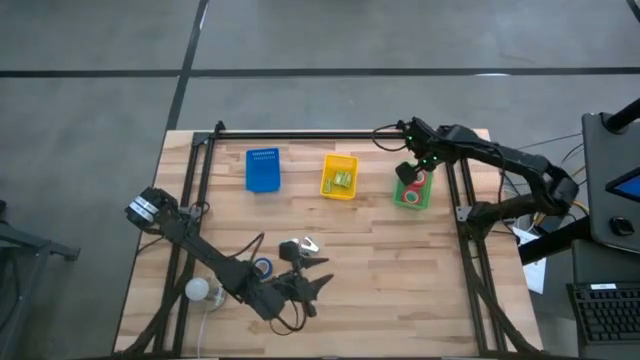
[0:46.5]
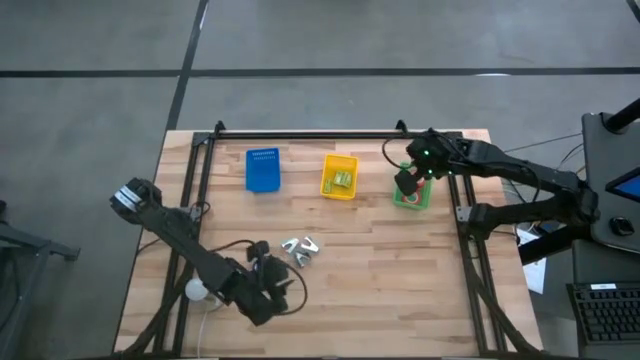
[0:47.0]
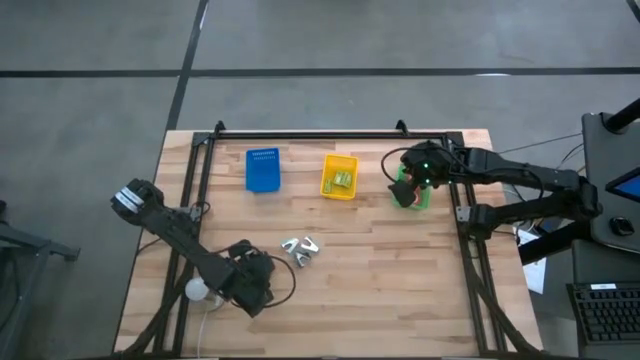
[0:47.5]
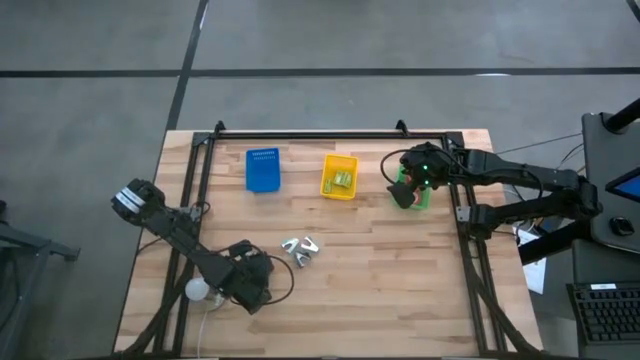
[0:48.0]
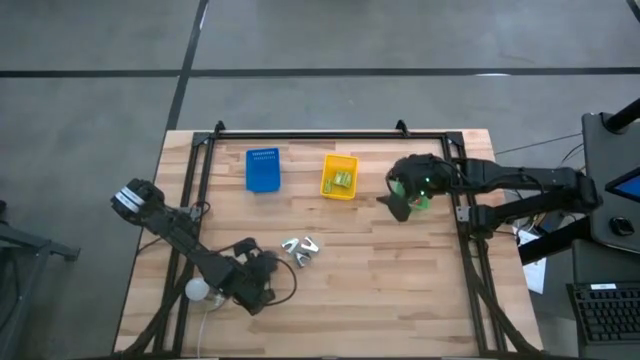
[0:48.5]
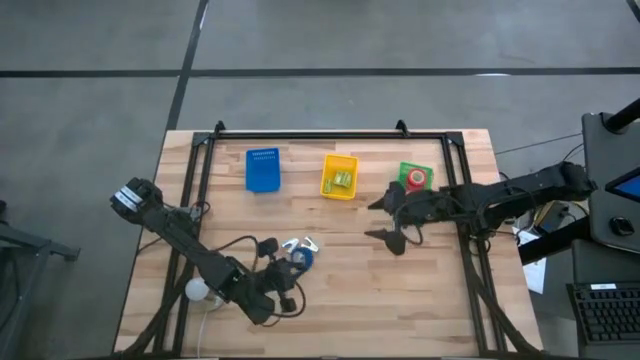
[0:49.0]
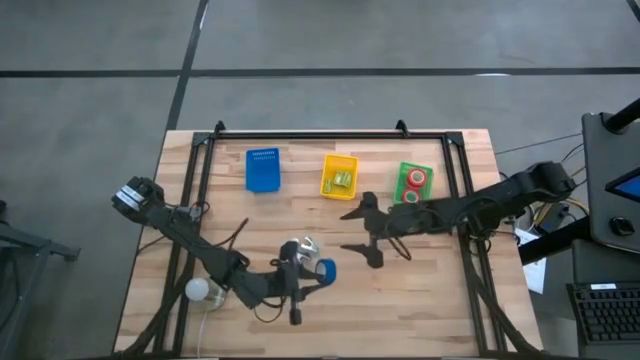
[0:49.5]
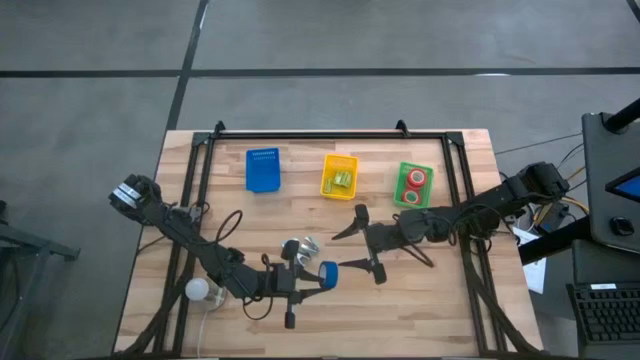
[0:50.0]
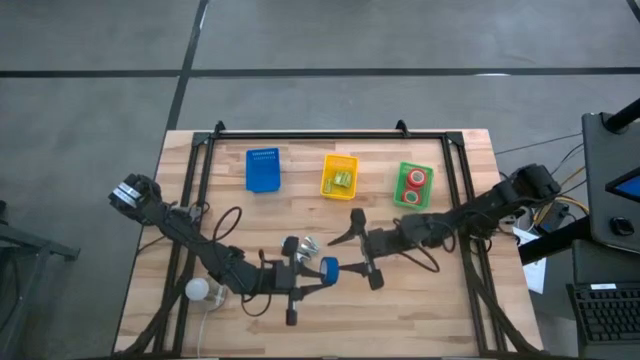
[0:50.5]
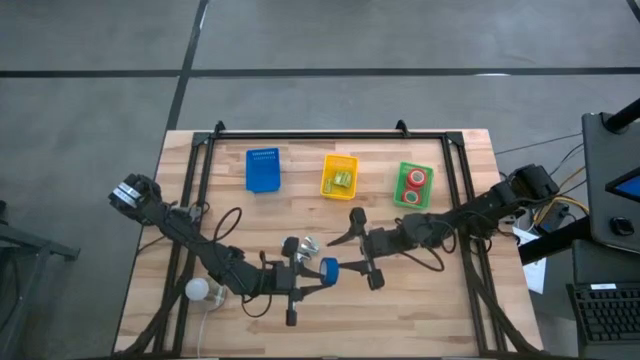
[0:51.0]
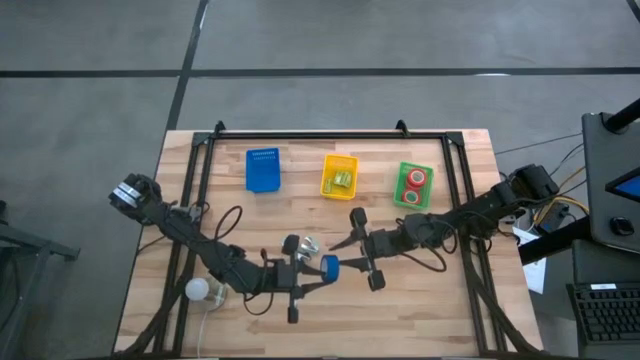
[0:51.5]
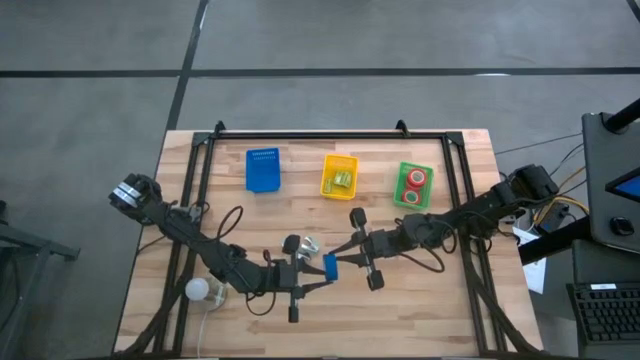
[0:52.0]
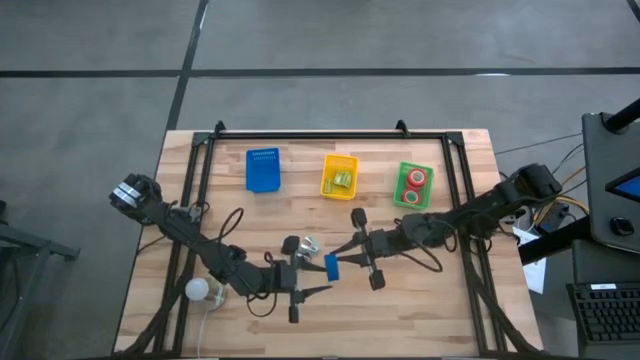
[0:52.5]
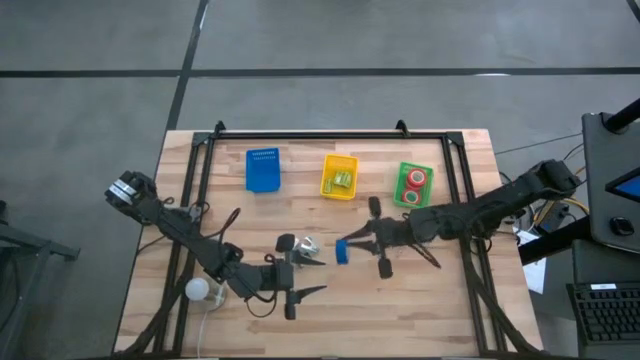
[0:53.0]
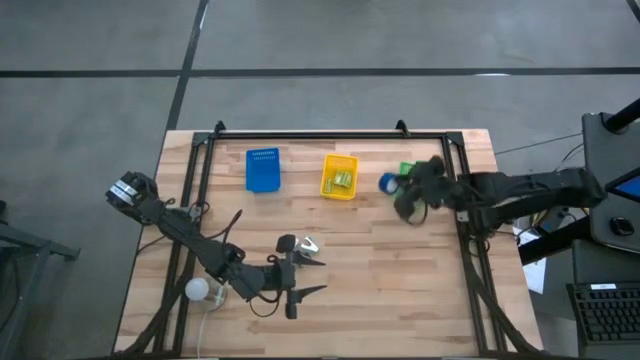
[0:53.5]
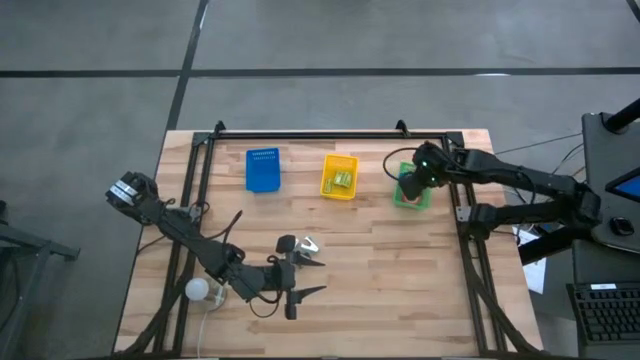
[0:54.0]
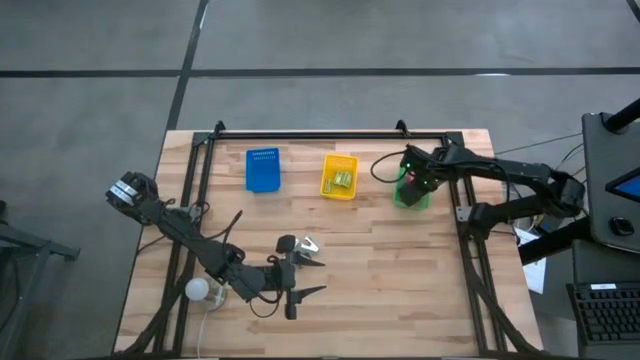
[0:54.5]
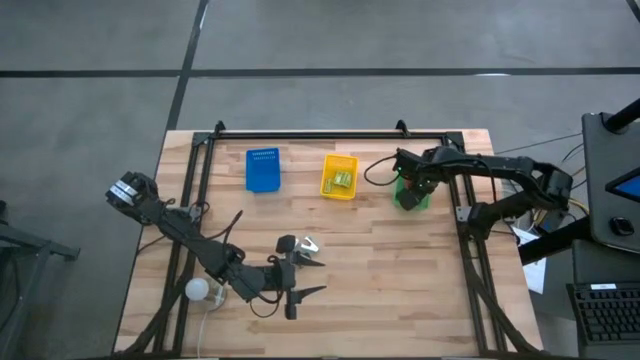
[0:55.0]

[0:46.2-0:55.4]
Task: Pick and place Stapler, Stapler remover, tape
Put the blue tape into the green bin

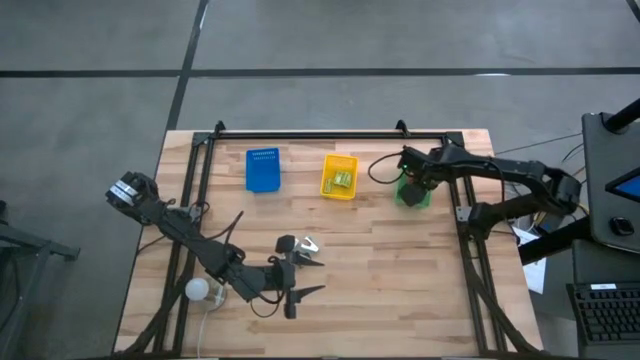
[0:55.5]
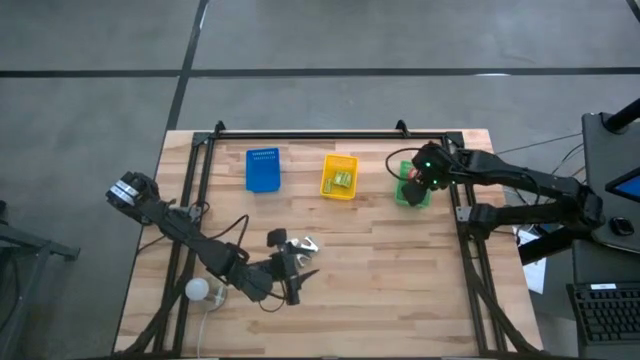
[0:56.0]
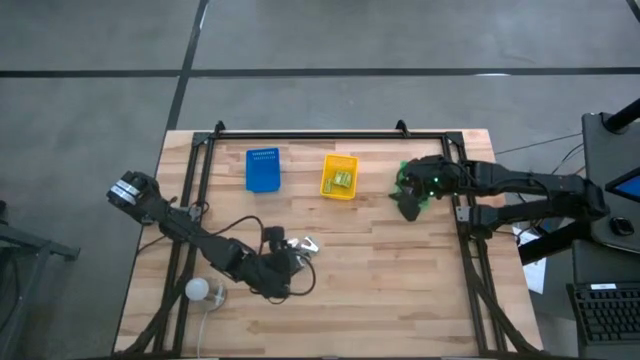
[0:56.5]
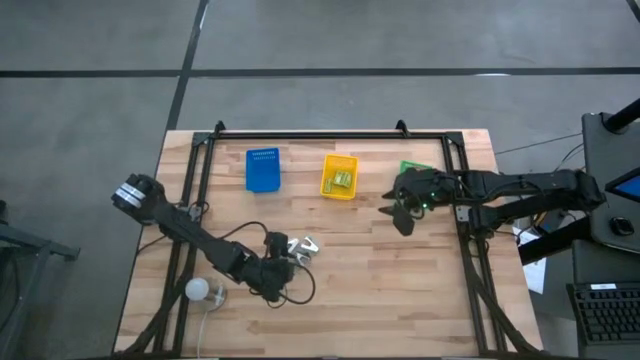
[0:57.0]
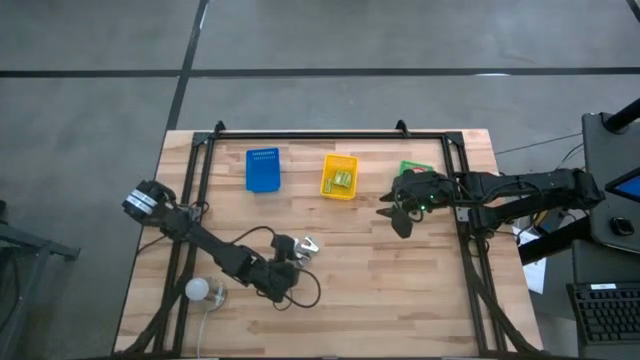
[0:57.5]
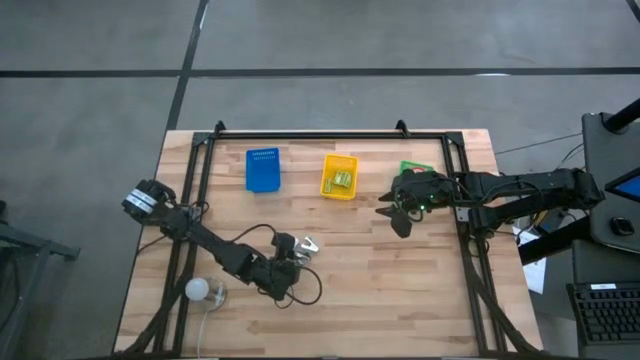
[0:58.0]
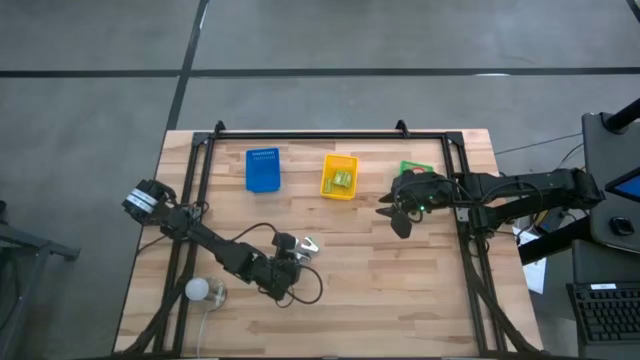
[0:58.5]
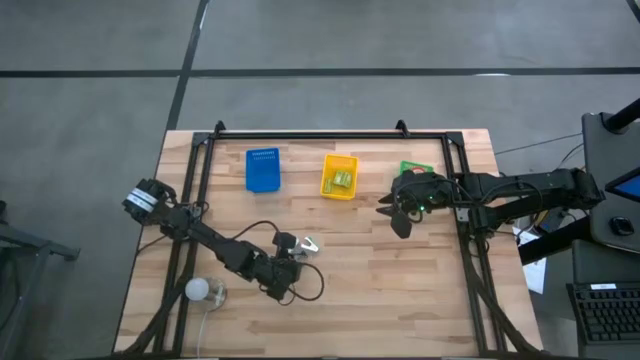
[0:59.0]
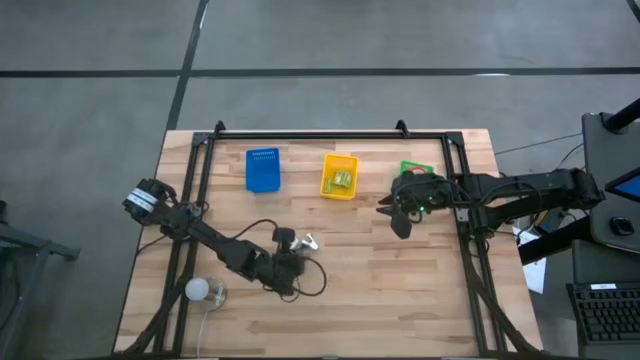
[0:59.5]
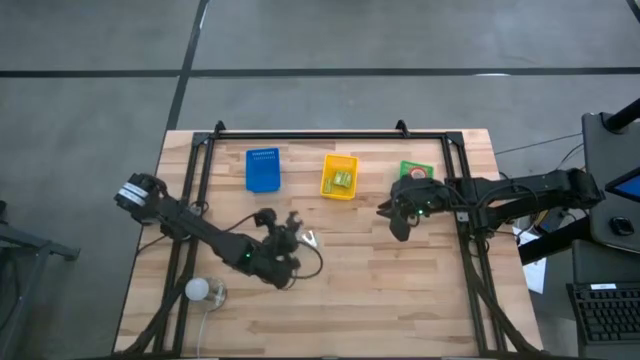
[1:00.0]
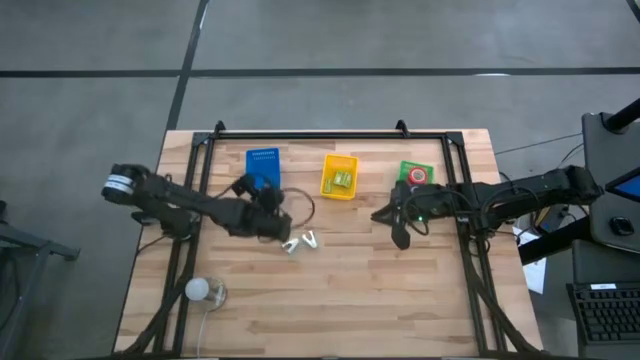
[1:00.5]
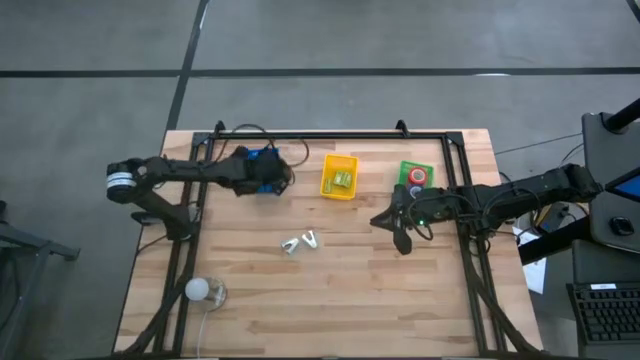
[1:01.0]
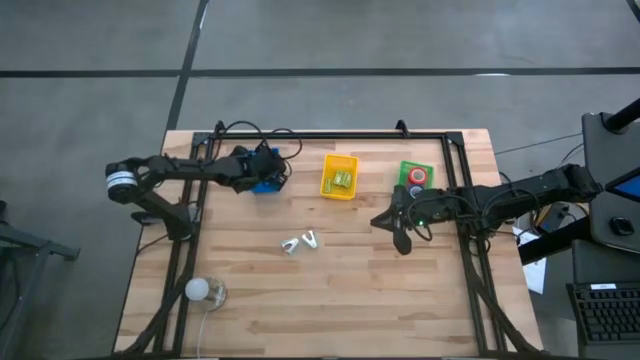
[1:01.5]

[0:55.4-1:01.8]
Put the black staple remover into the blue bin

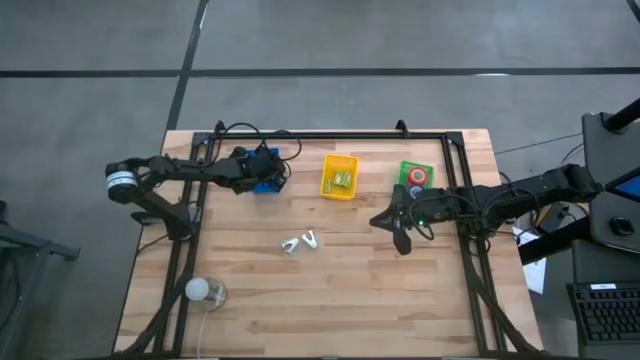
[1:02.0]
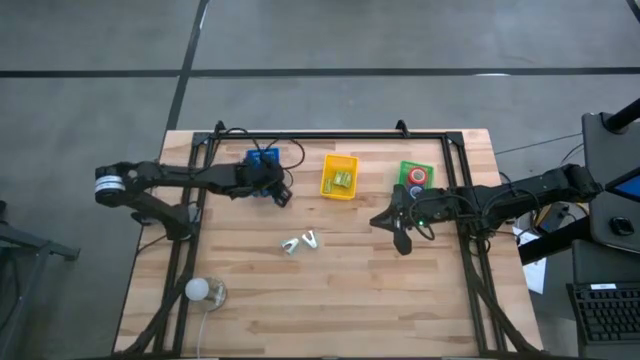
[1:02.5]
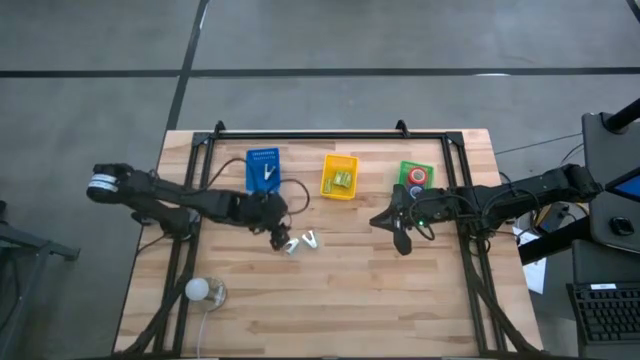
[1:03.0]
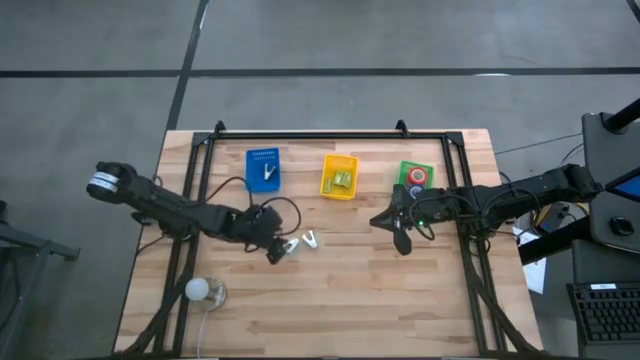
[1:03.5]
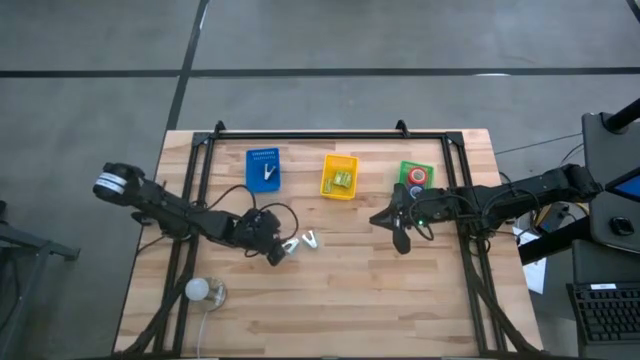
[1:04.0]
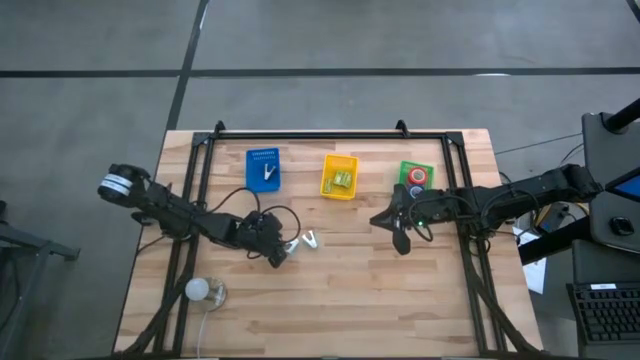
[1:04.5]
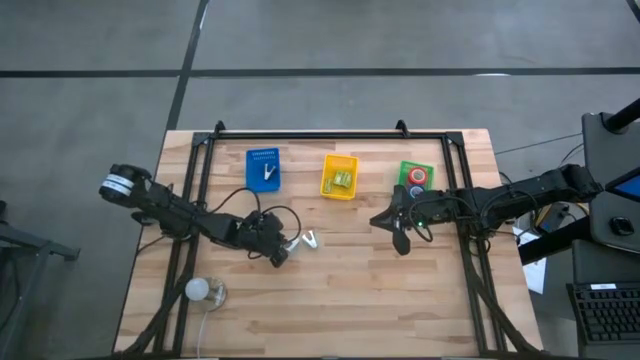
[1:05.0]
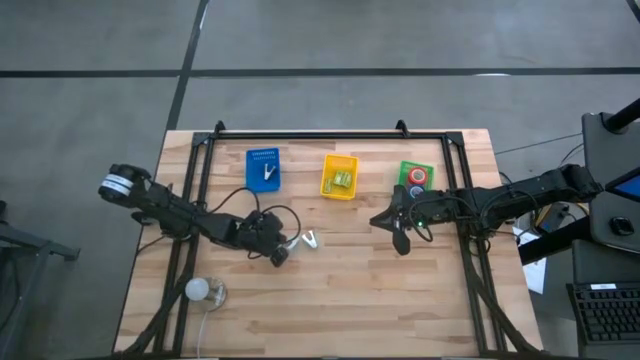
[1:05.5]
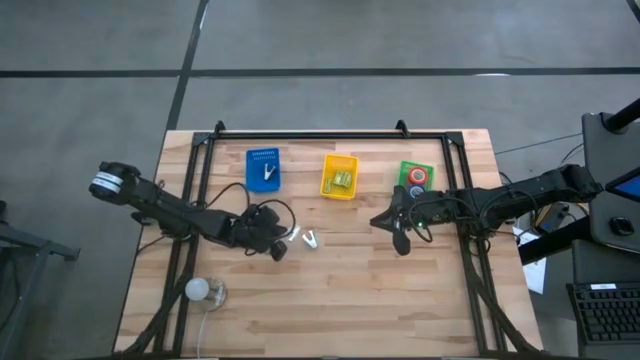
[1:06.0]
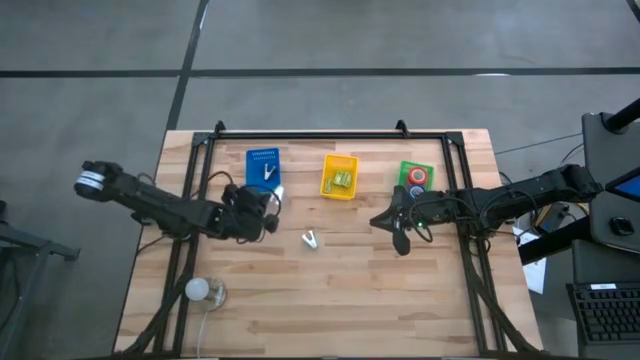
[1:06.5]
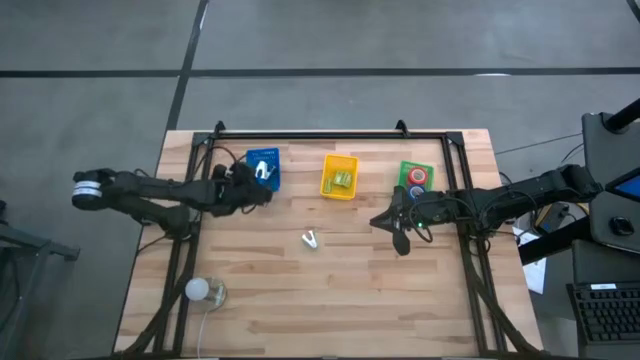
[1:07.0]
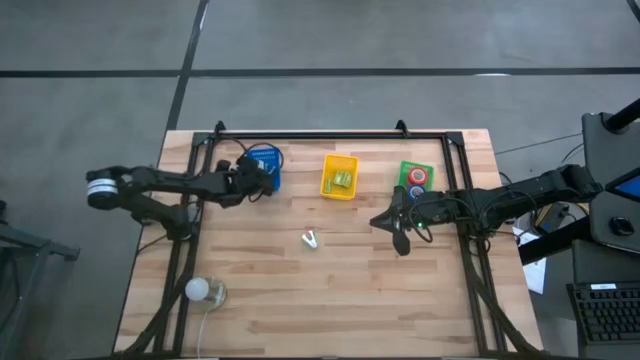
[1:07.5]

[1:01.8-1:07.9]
Put the left light blue staple remover into the blue bin

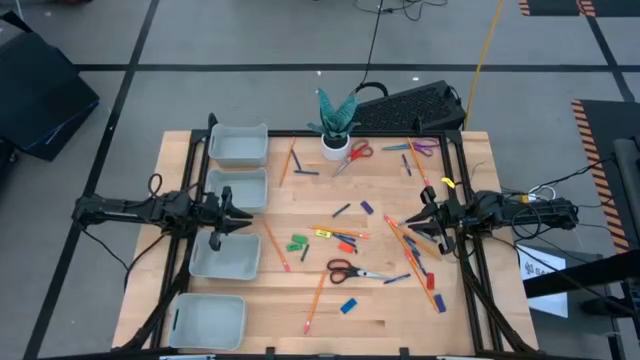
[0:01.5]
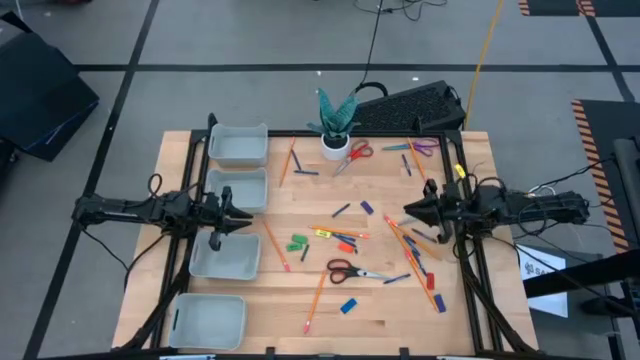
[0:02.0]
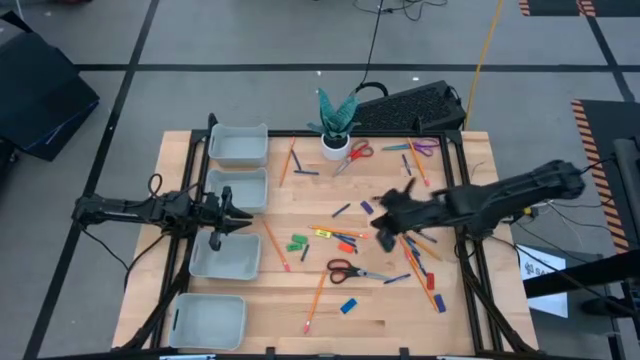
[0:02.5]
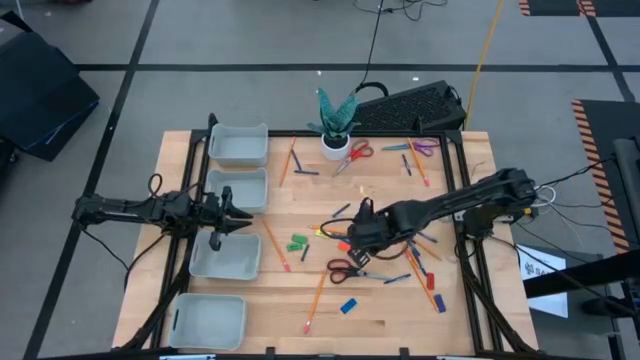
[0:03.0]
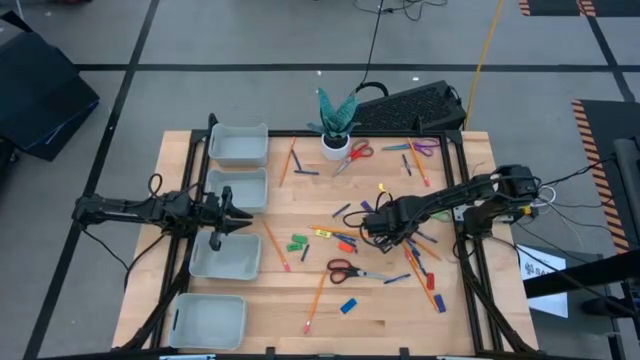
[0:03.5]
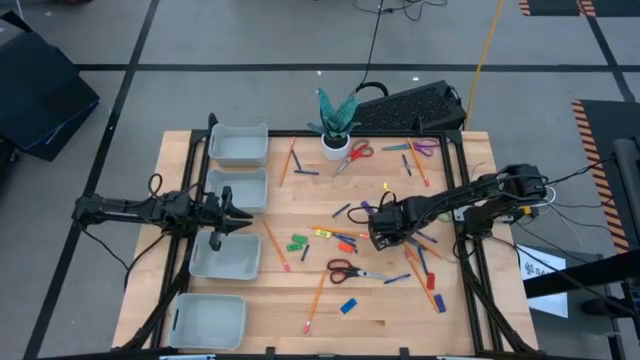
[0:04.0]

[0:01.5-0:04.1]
Task: Sort crayons/erasers/pens/pencils in bins
Put the orange pencil into the middle top gray bin
